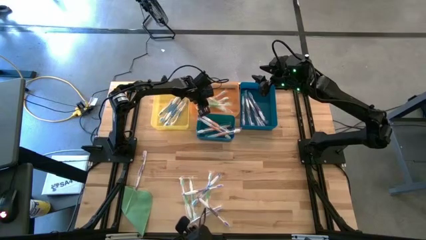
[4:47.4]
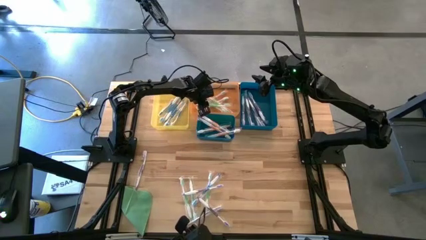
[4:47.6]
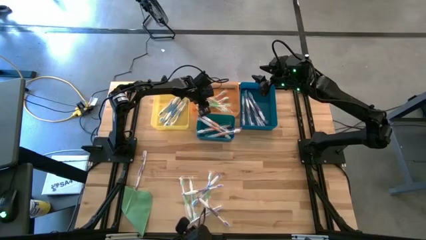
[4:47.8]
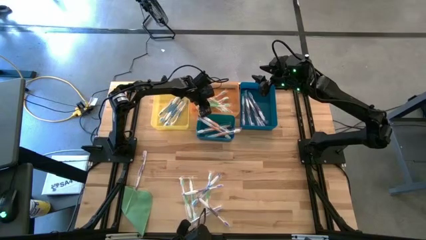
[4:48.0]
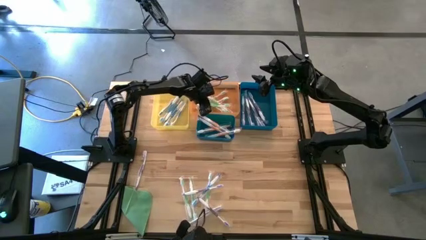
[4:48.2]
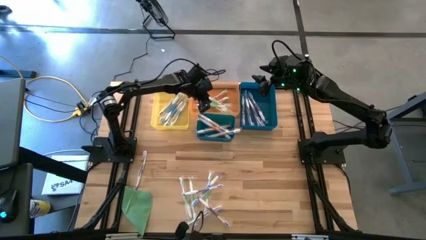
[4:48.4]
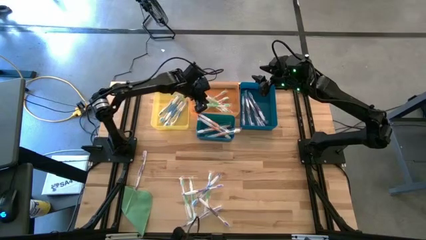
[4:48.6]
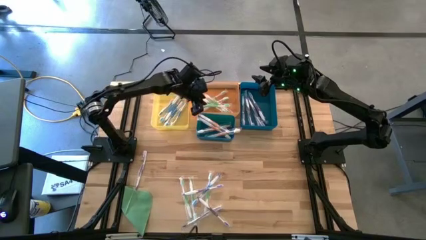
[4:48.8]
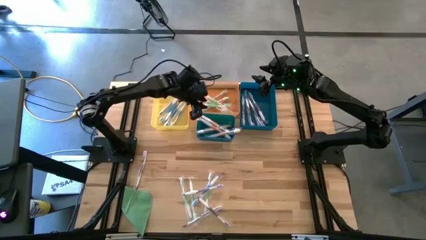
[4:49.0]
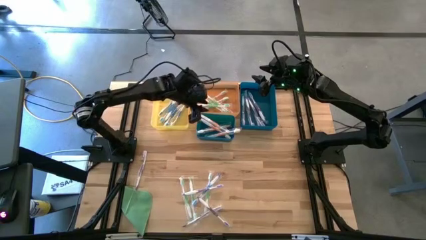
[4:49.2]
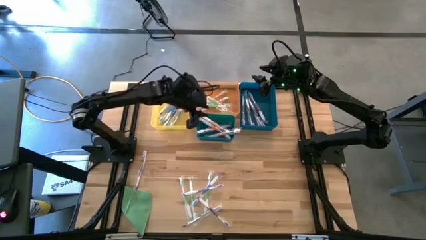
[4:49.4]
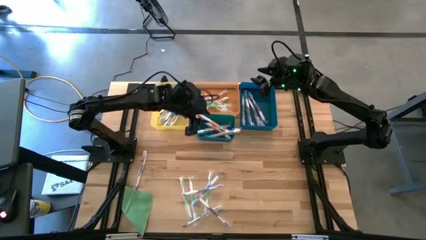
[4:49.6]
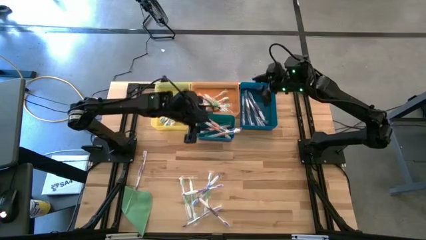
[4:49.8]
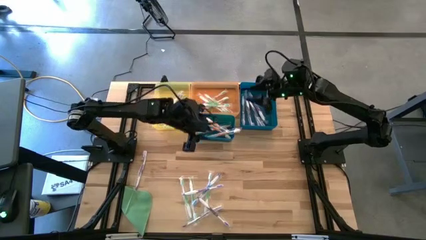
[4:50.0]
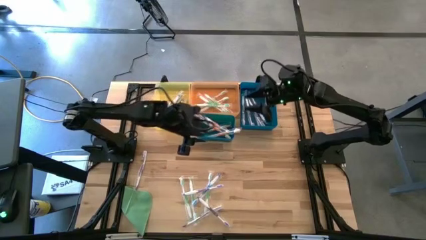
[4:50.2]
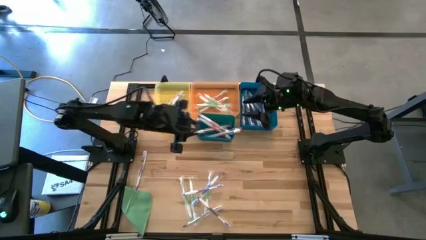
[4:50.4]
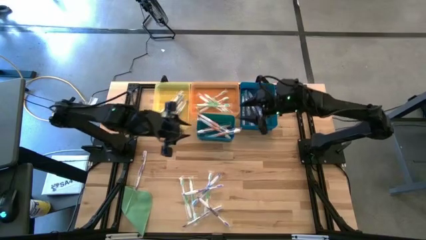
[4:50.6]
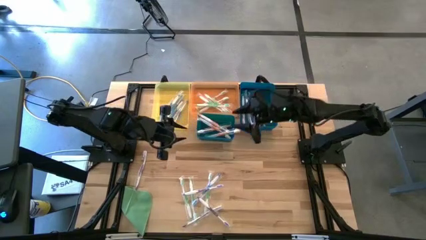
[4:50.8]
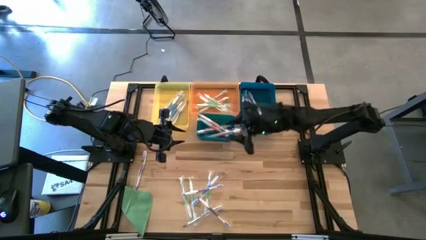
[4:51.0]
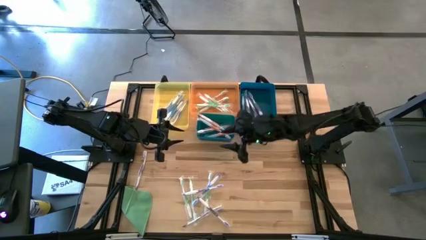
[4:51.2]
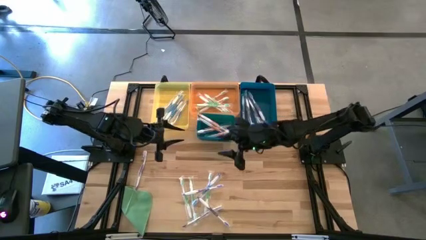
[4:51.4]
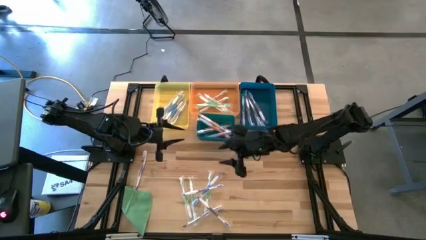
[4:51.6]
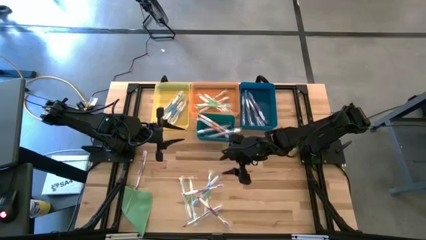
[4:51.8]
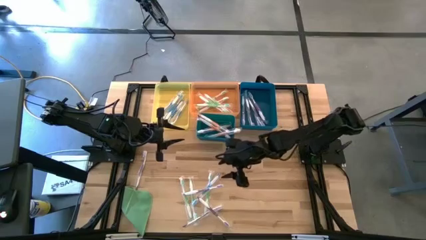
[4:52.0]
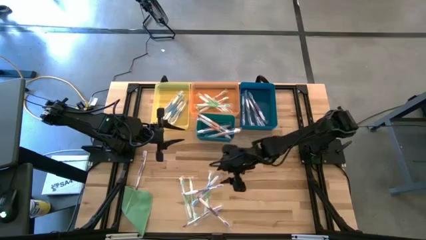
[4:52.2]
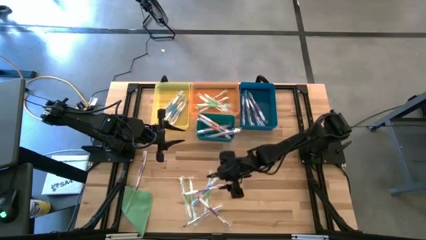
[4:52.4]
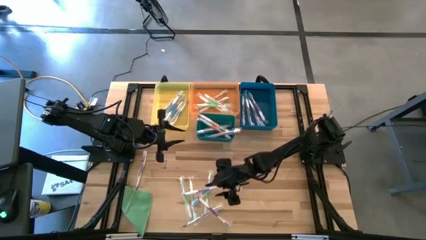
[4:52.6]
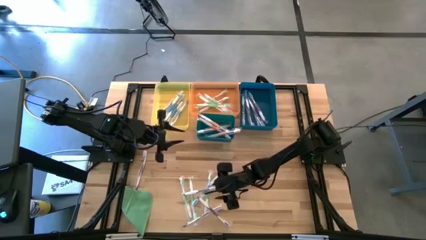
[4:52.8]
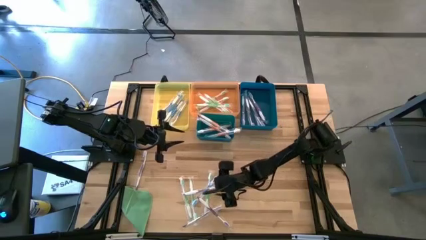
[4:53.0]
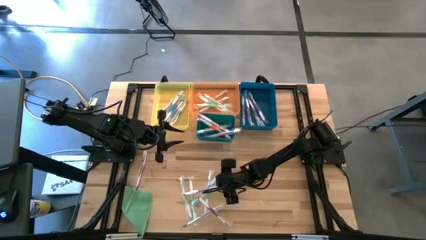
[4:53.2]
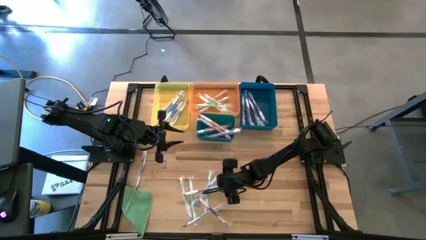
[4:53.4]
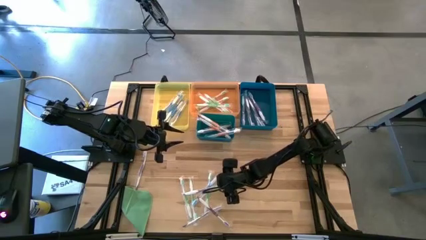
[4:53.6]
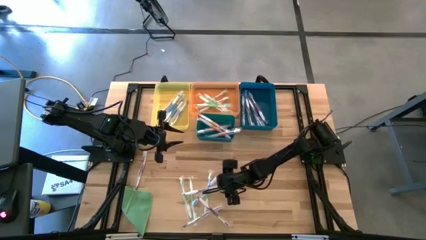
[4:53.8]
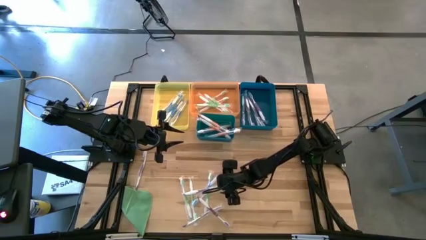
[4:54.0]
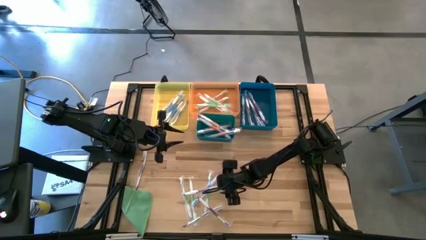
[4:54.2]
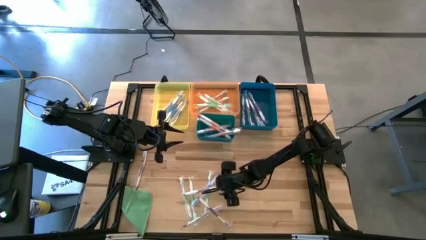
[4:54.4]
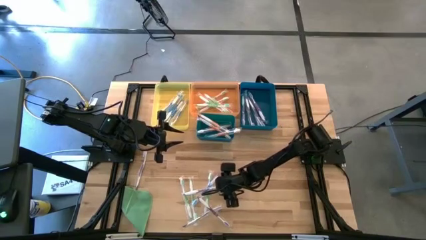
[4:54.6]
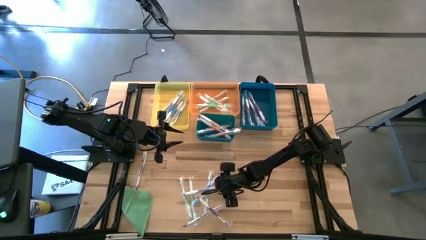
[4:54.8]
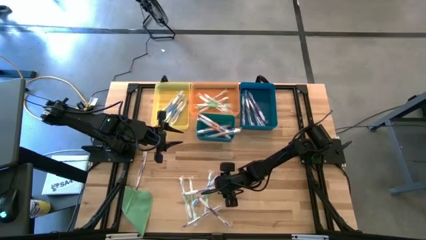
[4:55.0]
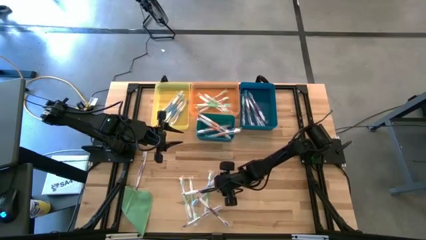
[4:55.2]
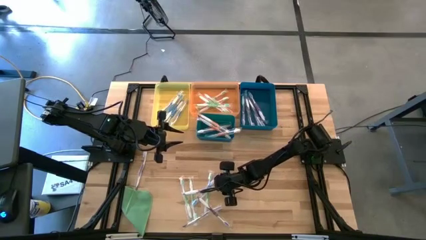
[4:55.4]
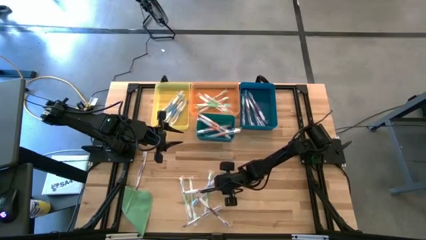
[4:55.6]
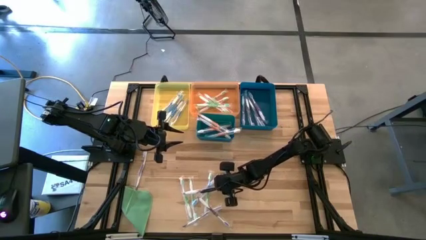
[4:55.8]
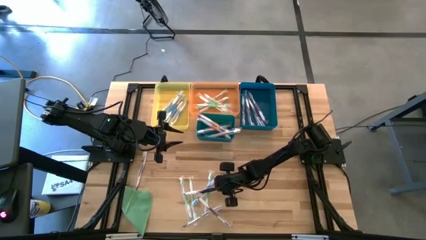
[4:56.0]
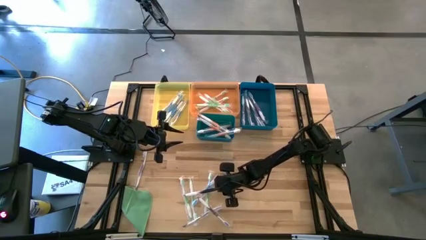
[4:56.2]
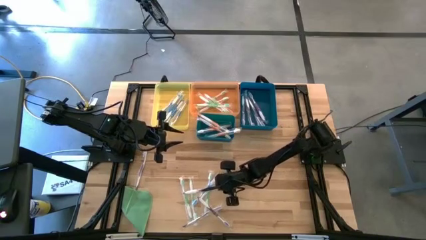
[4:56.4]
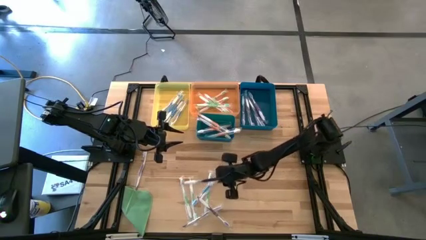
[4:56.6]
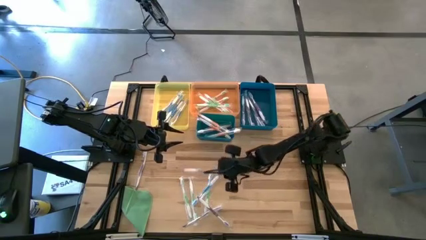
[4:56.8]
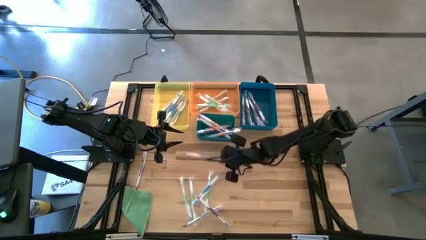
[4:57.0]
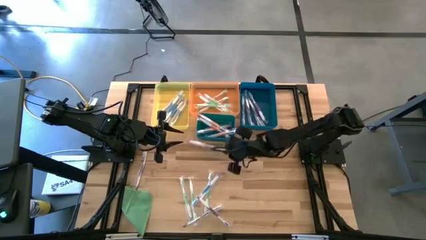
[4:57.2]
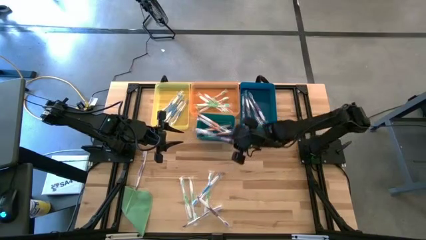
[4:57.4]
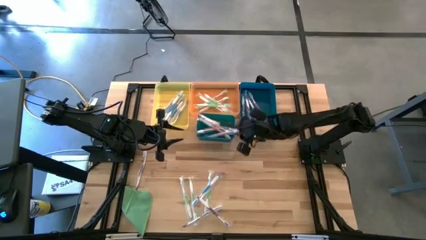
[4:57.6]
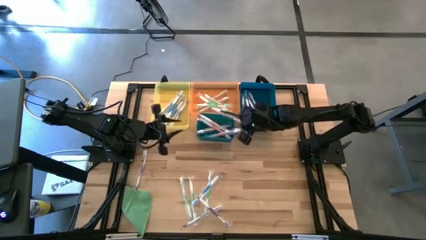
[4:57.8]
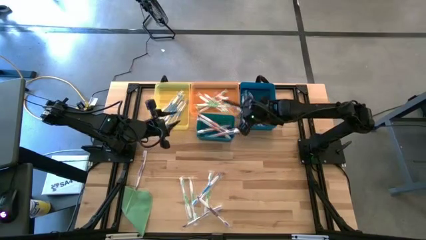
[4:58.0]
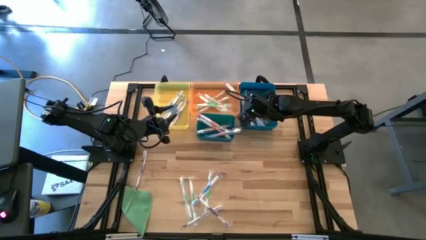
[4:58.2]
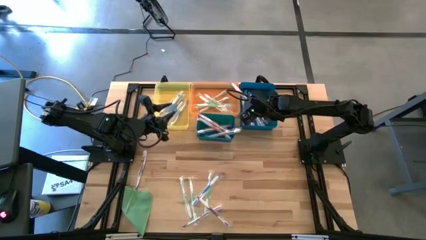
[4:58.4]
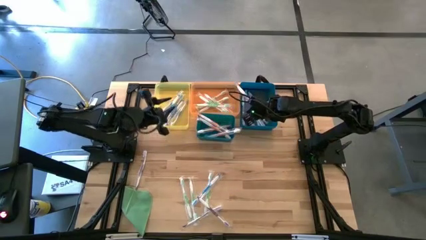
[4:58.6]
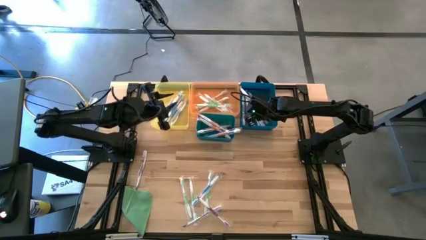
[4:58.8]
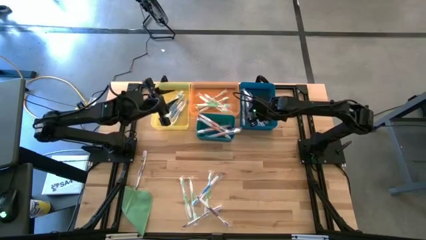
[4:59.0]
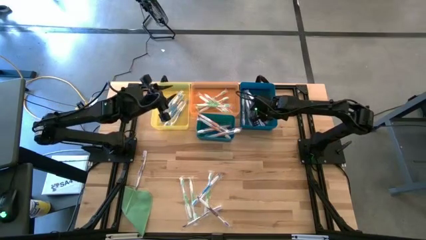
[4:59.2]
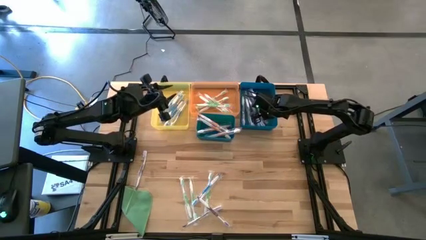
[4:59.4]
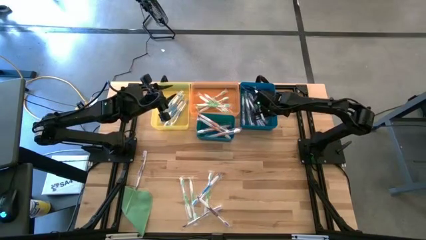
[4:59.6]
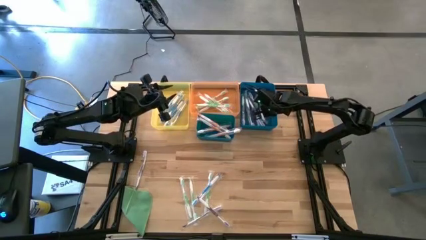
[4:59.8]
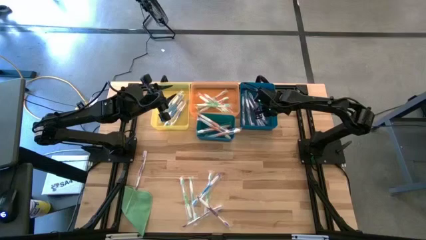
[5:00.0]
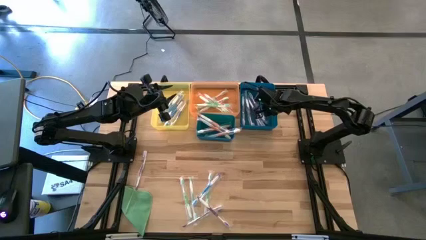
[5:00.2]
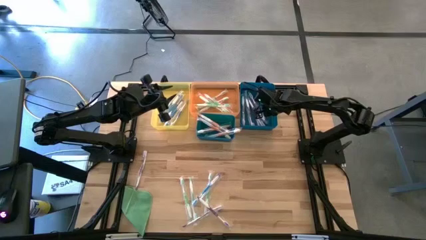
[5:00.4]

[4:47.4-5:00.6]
Task: Pick & Place Toothbrushes
Put the purple toothbrush into the blue bin
